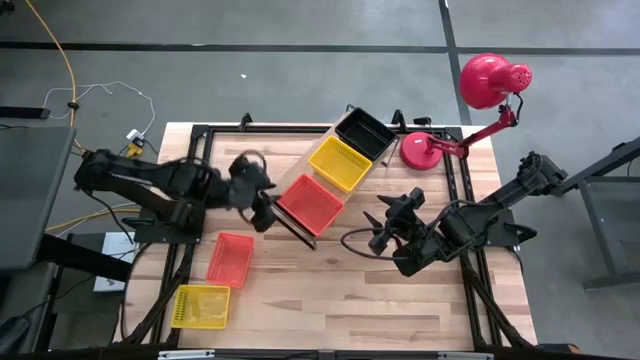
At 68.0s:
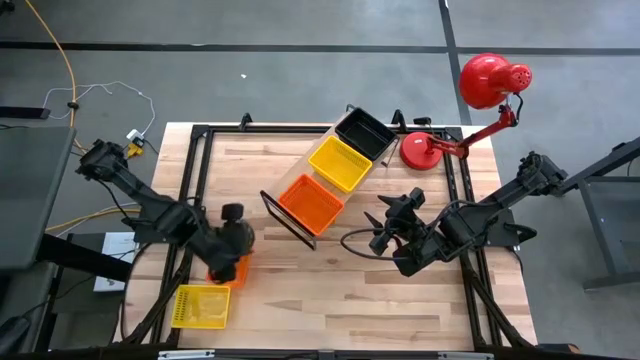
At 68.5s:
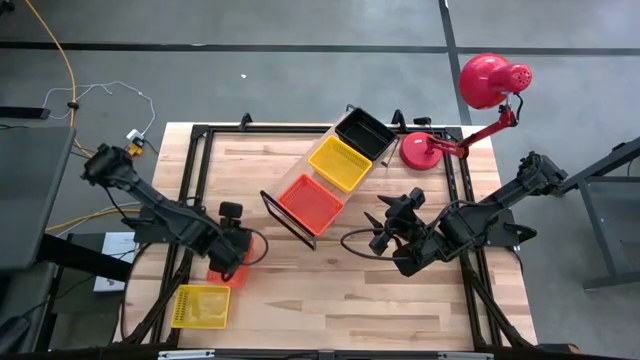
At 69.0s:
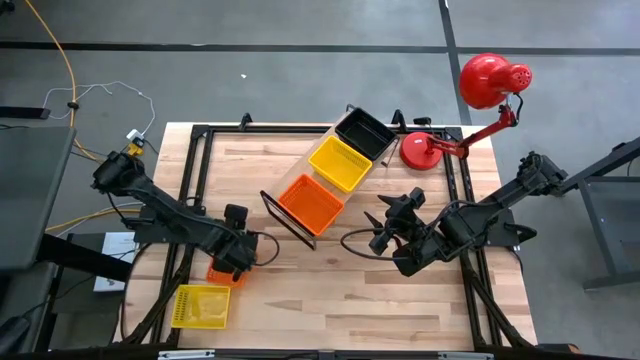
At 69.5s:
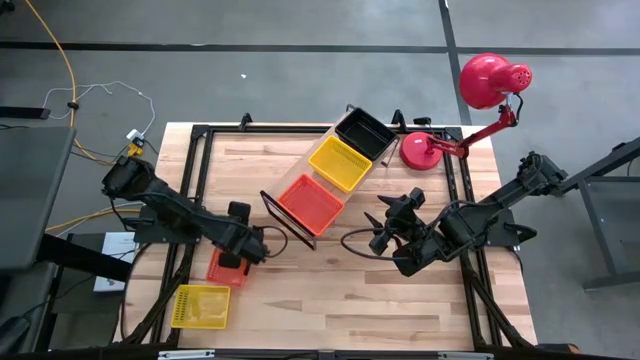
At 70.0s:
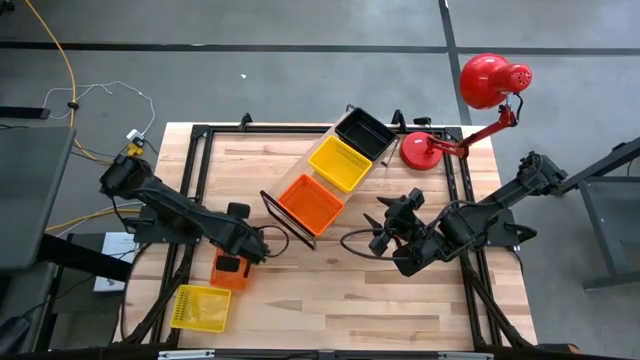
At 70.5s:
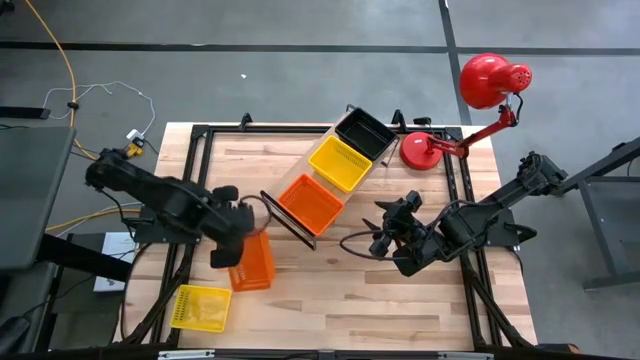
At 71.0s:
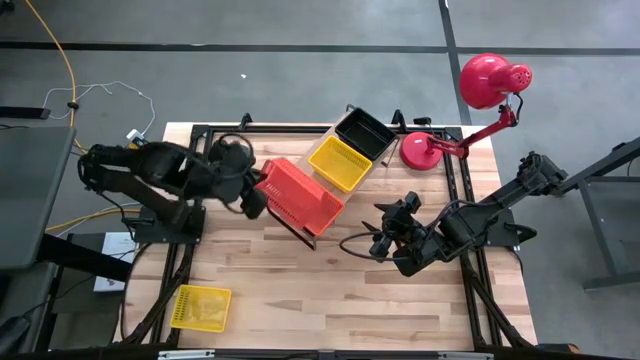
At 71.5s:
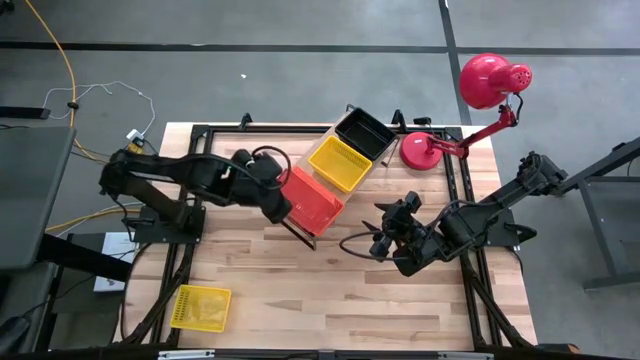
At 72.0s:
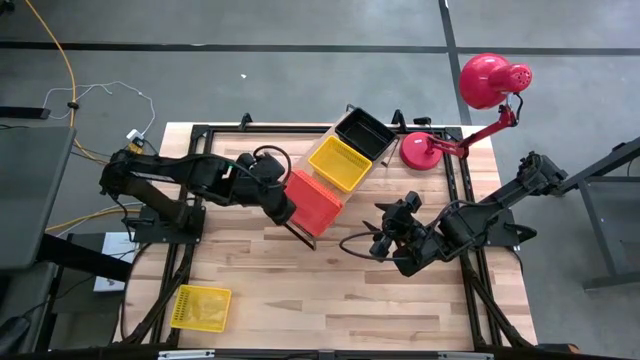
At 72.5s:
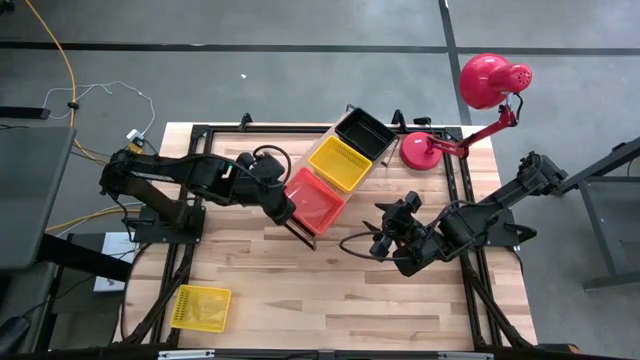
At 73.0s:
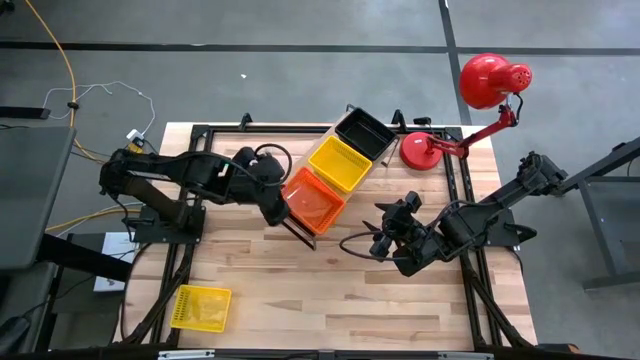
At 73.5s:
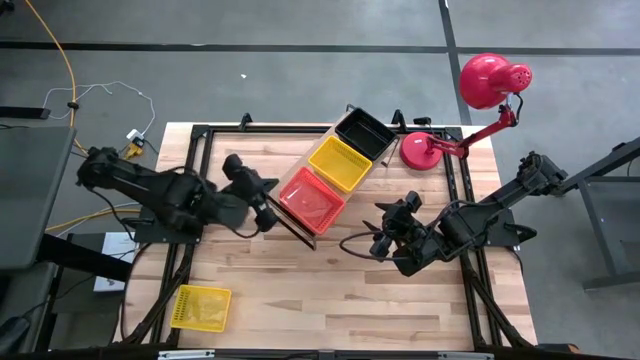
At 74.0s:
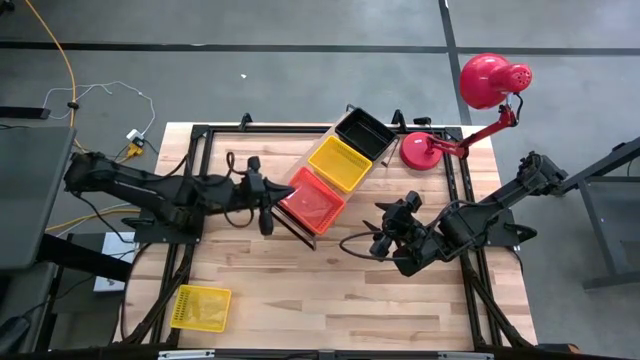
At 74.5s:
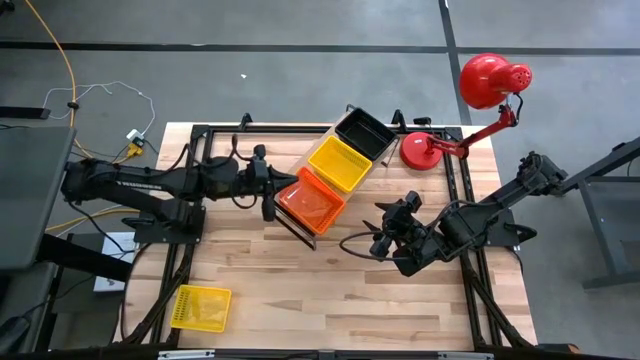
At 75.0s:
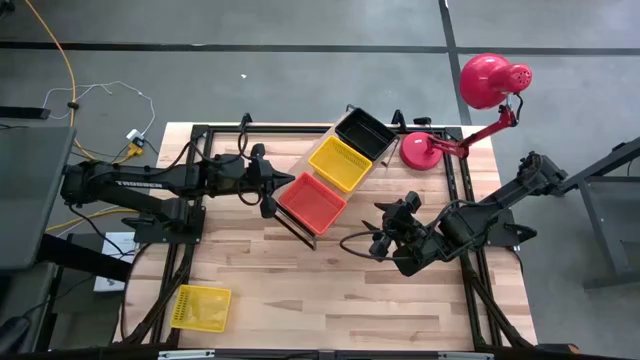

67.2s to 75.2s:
Task: Stack baskets on shelf by color
Stack the orange basket on top of the orange baskets on the shelf

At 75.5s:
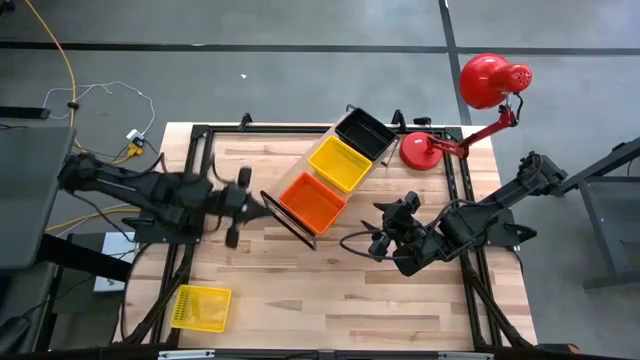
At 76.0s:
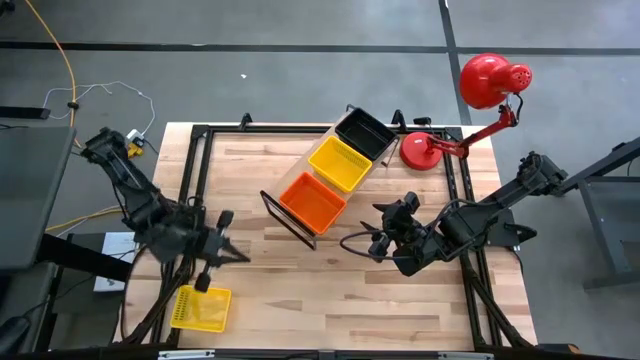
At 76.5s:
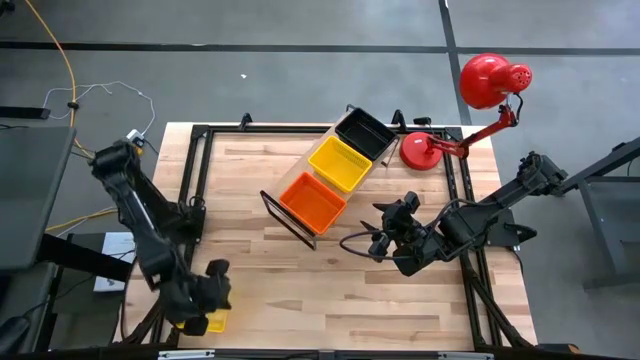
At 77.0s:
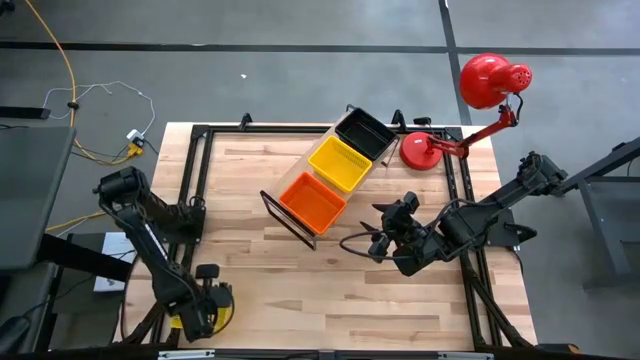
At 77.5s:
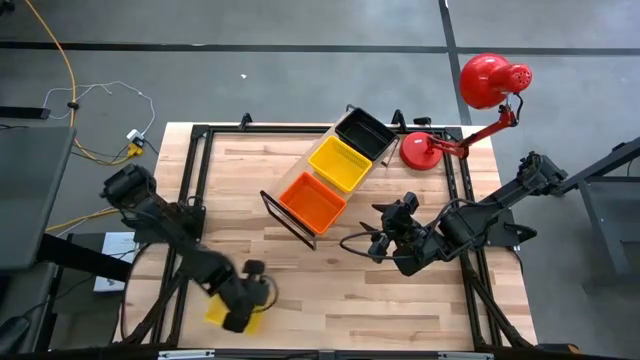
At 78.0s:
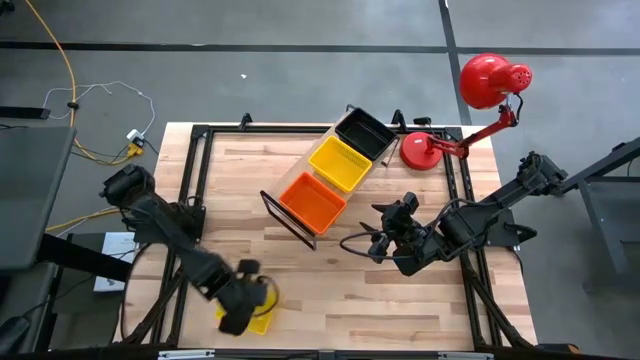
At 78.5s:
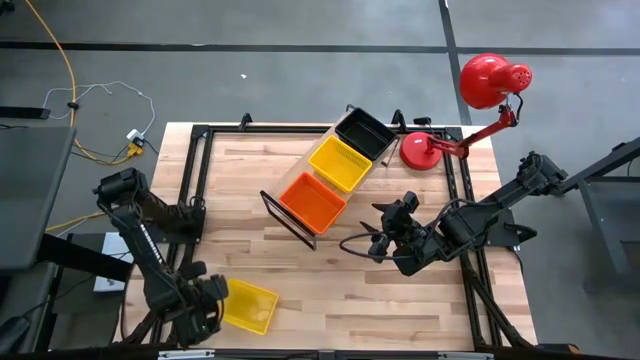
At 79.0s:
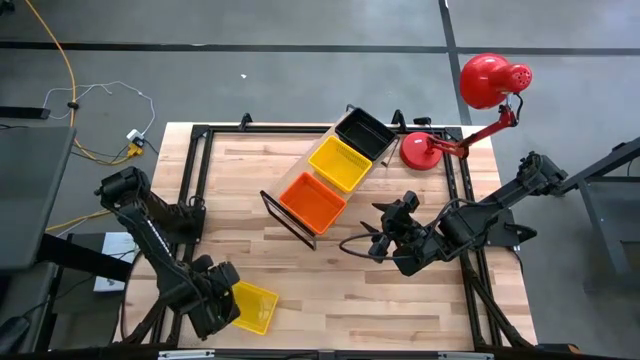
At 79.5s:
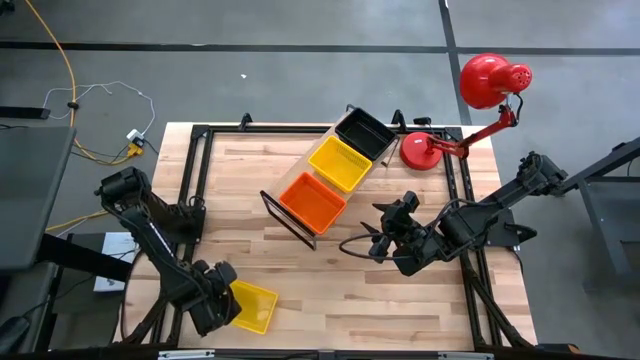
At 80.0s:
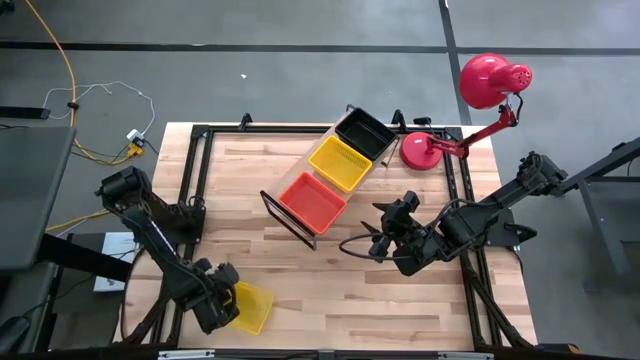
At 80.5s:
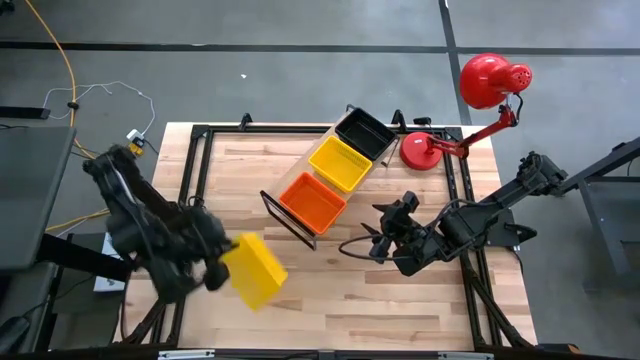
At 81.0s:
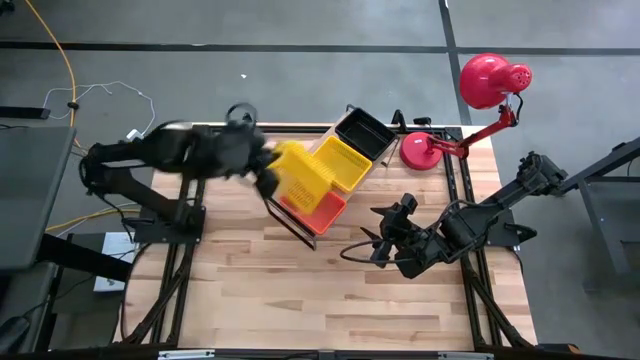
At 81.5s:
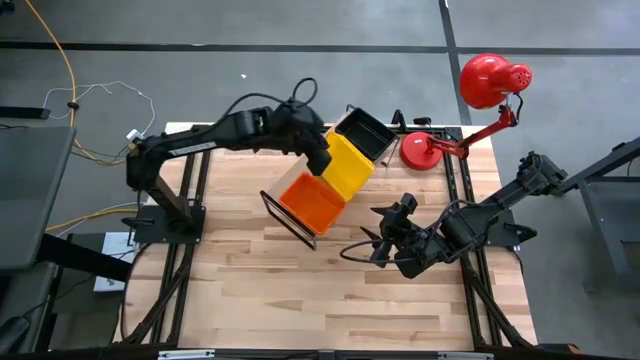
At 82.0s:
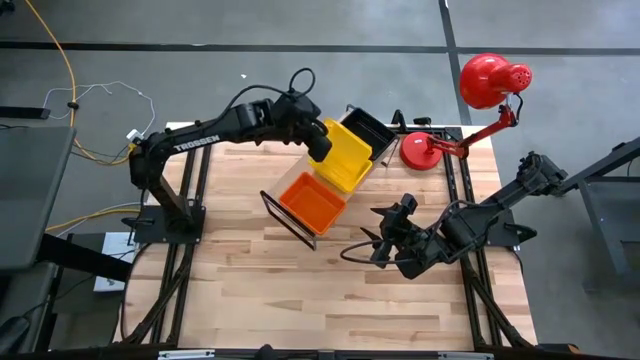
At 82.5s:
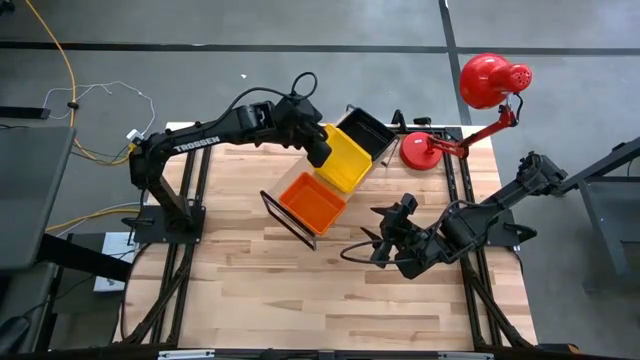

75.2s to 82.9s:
Stack the yellow basket on top of the yellow baskets on the shelf

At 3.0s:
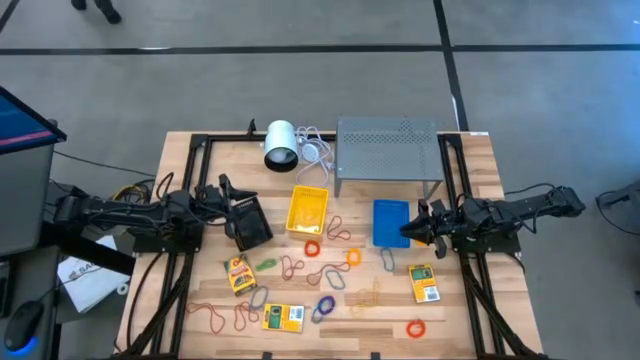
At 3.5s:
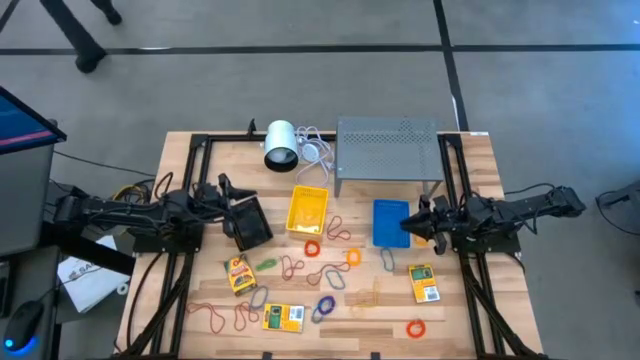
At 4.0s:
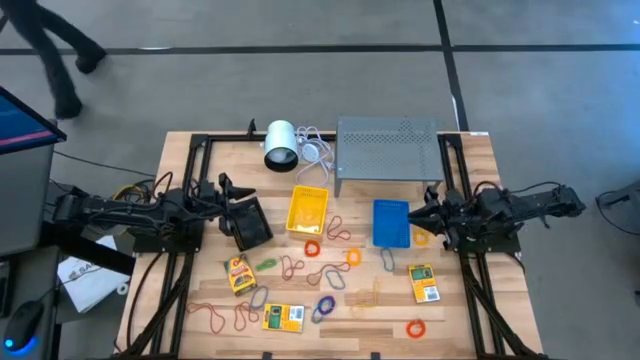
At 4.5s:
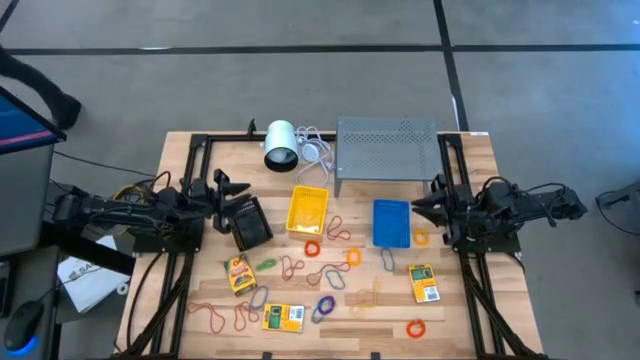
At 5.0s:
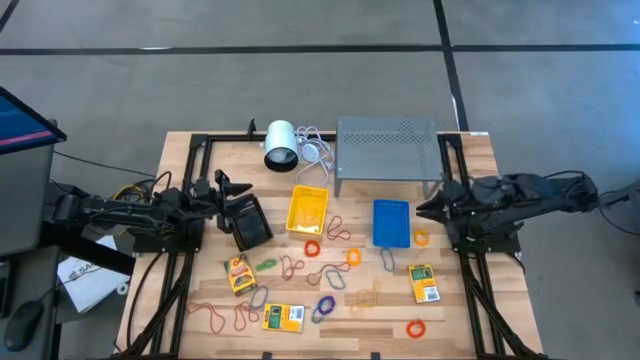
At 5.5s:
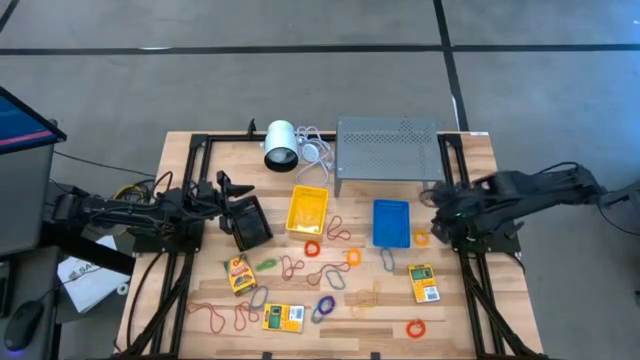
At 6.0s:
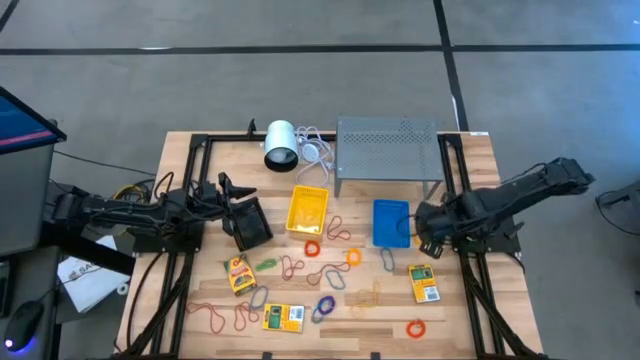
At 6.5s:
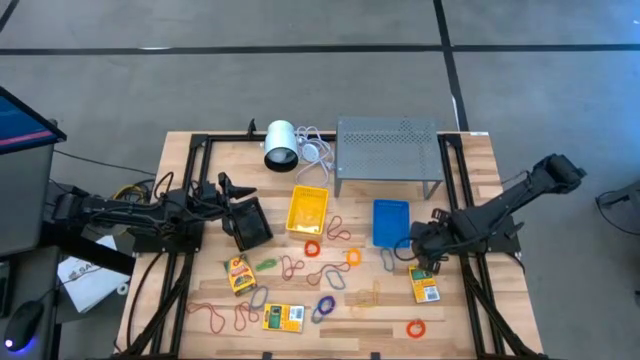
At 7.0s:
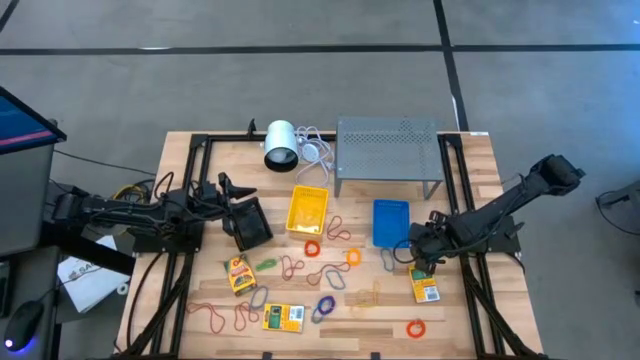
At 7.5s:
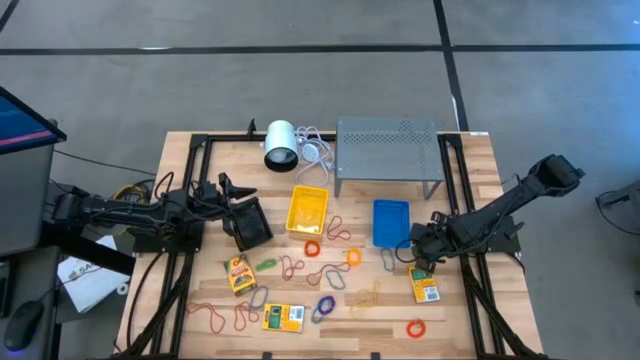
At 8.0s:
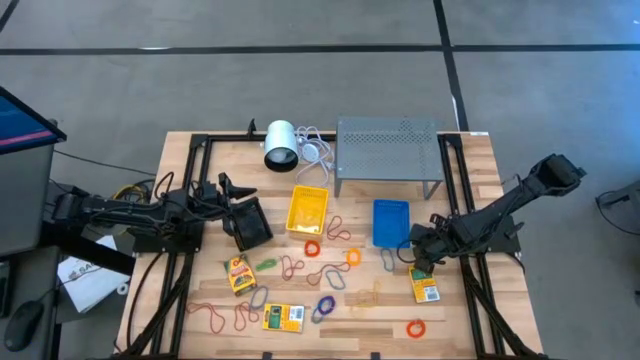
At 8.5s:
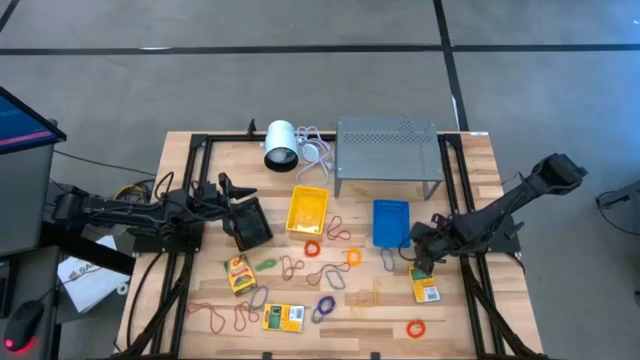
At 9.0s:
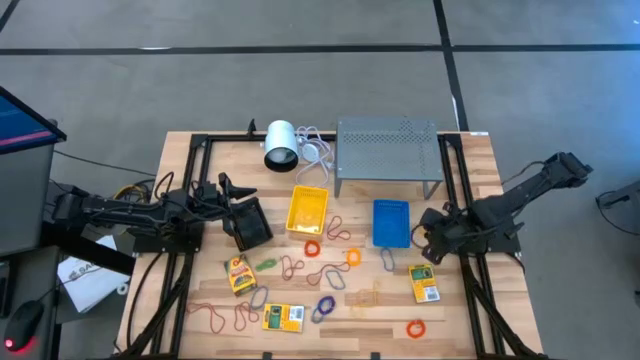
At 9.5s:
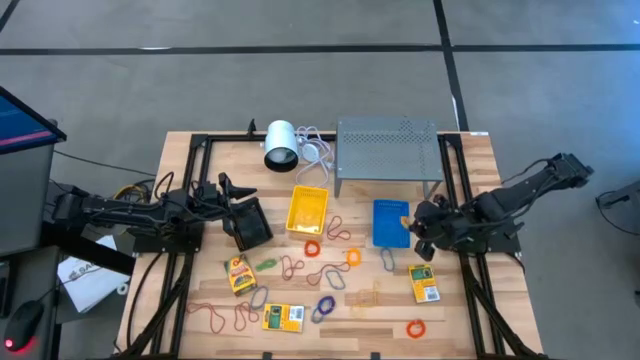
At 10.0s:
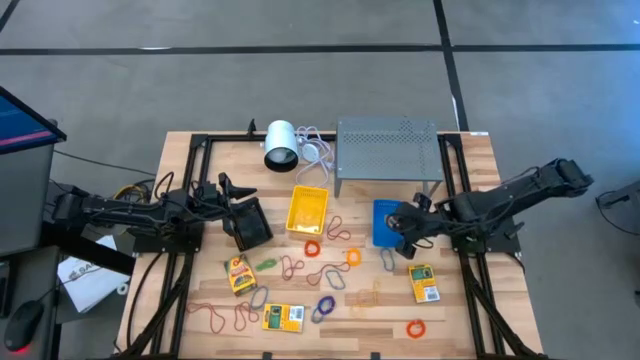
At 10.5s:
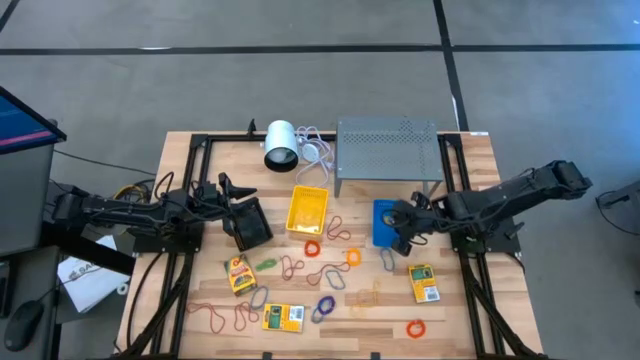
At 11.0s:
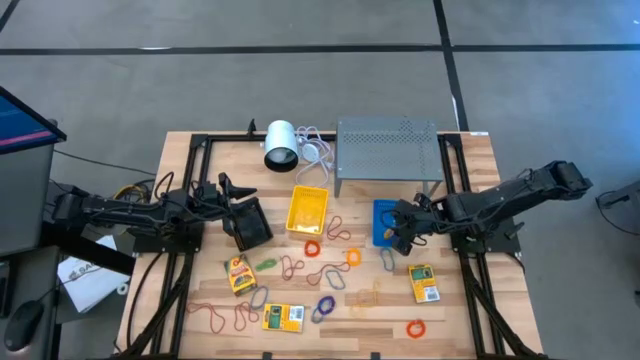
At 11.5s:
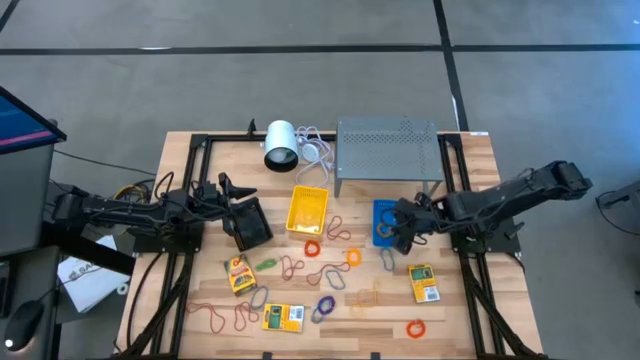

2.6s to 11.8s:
Task: Pick & Place Office Desk Supplies
Put the top right yellow elastic key ring into the blue basket
